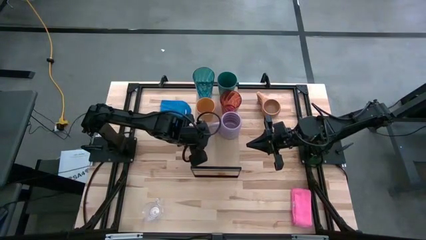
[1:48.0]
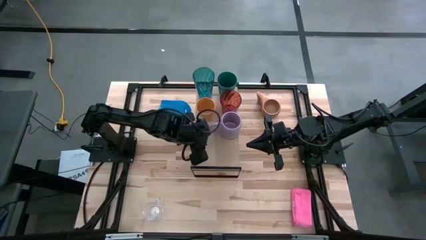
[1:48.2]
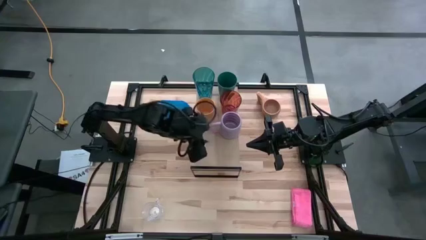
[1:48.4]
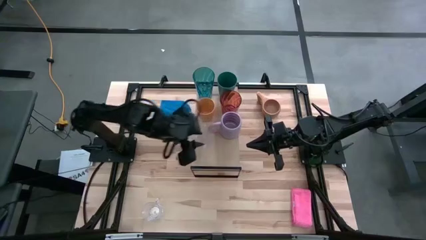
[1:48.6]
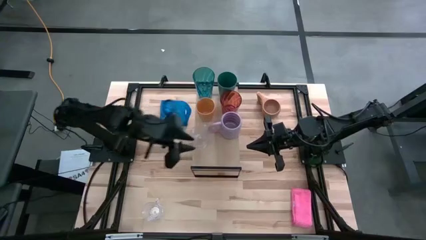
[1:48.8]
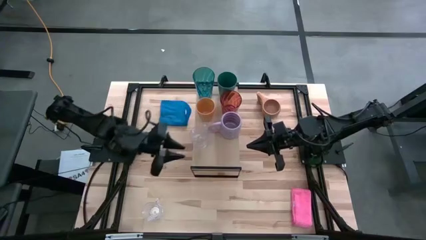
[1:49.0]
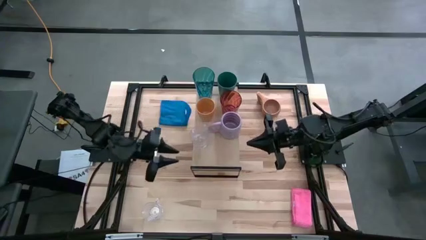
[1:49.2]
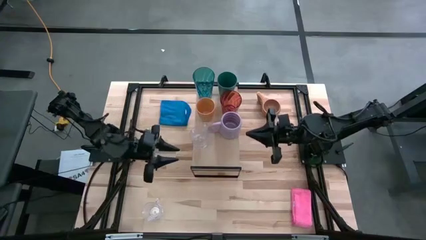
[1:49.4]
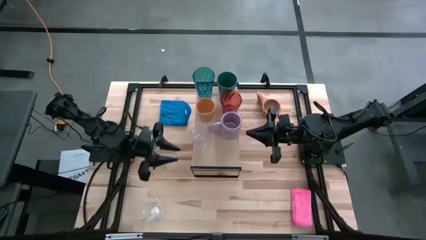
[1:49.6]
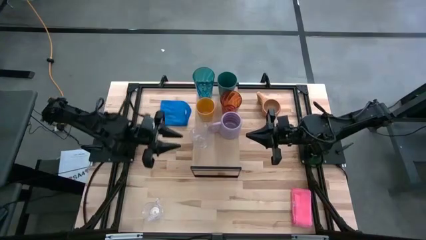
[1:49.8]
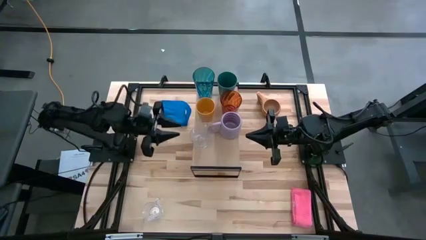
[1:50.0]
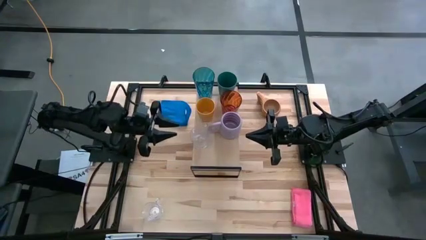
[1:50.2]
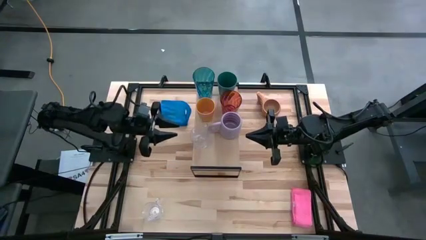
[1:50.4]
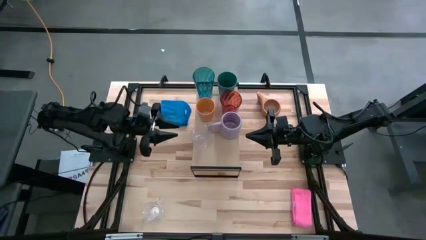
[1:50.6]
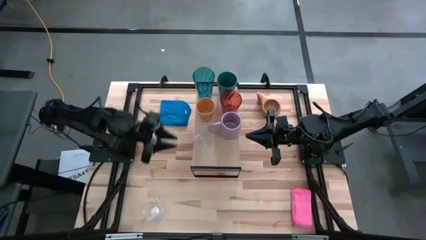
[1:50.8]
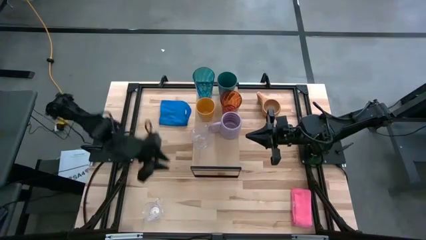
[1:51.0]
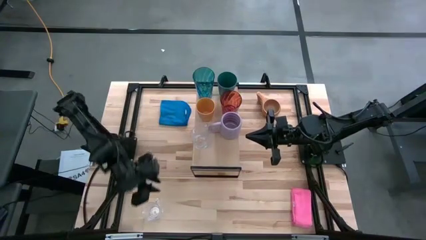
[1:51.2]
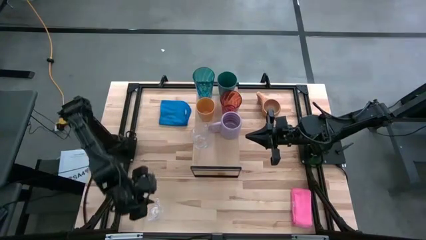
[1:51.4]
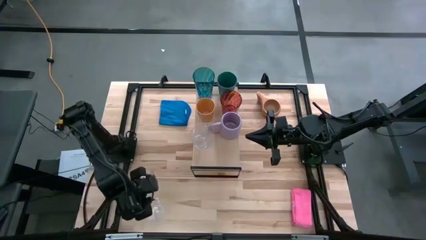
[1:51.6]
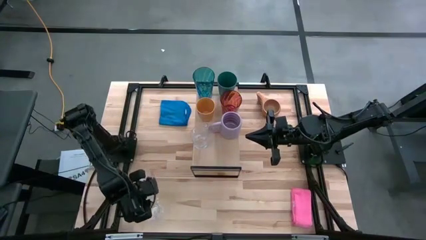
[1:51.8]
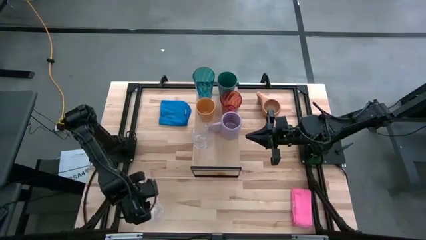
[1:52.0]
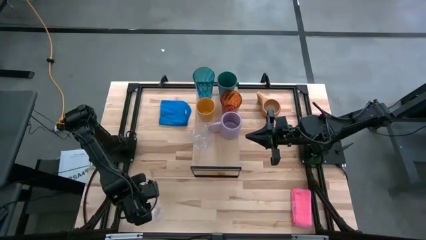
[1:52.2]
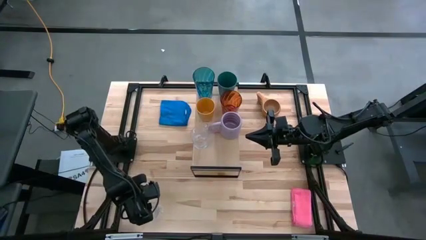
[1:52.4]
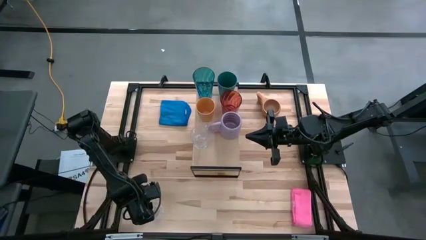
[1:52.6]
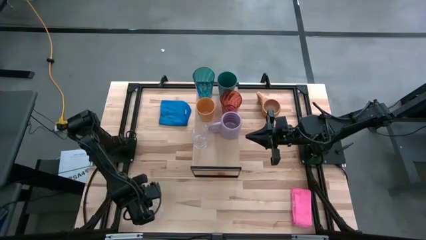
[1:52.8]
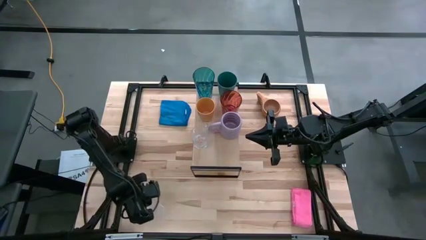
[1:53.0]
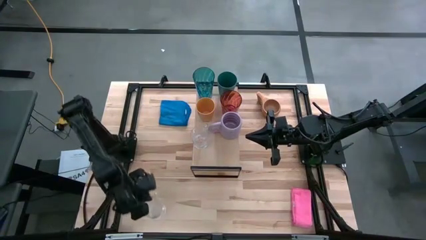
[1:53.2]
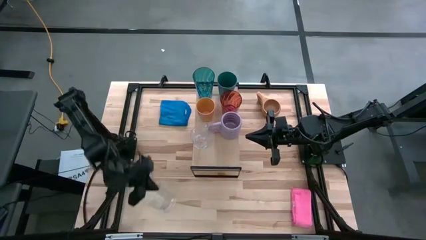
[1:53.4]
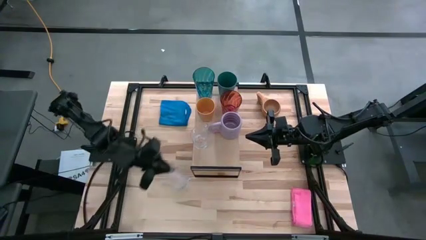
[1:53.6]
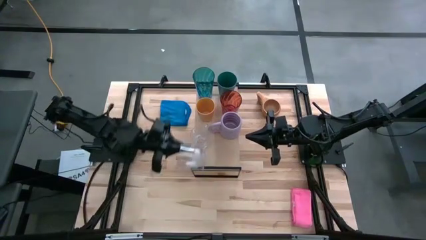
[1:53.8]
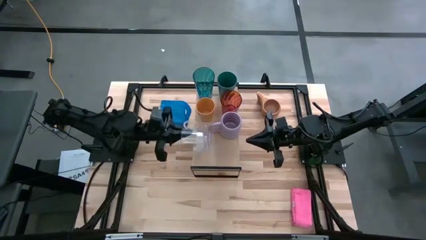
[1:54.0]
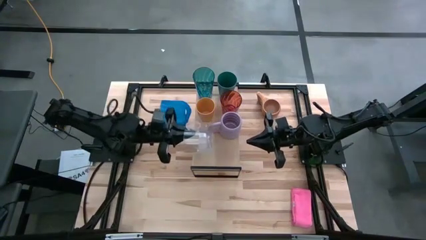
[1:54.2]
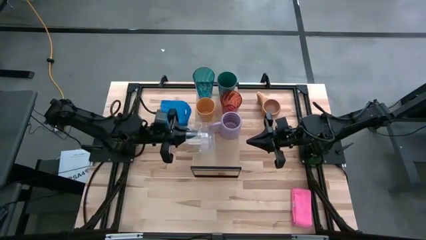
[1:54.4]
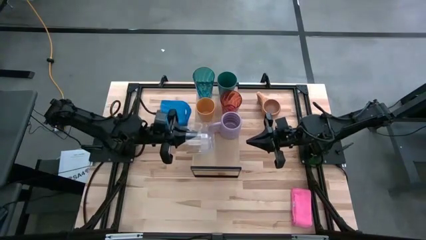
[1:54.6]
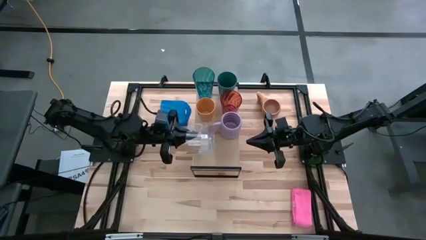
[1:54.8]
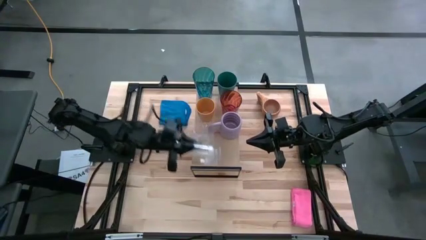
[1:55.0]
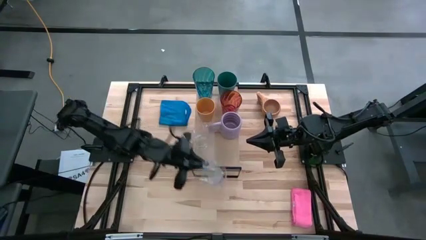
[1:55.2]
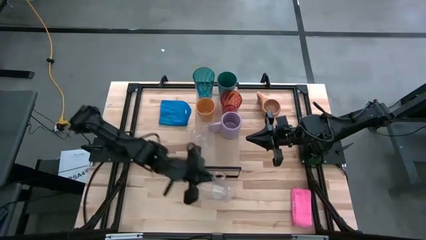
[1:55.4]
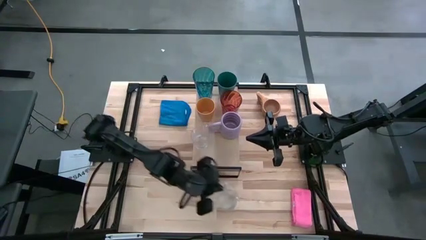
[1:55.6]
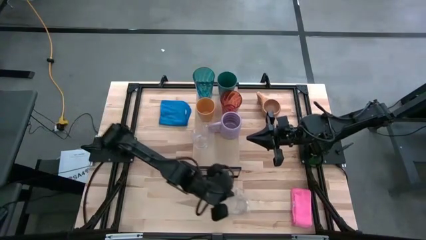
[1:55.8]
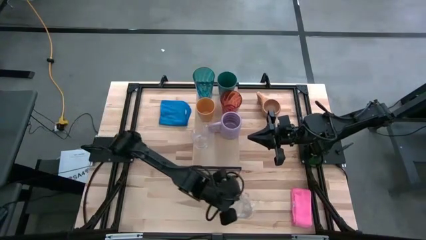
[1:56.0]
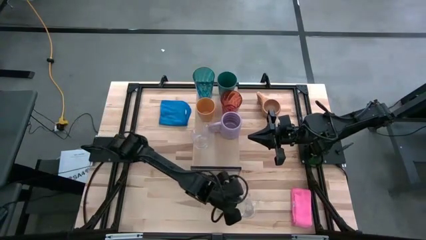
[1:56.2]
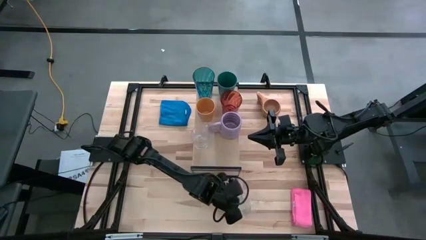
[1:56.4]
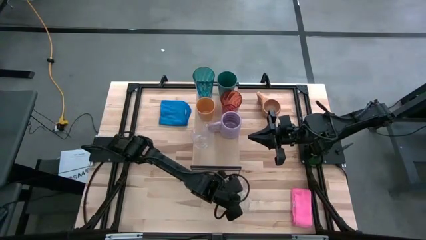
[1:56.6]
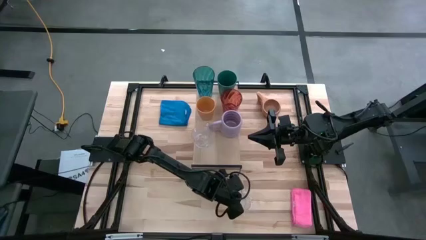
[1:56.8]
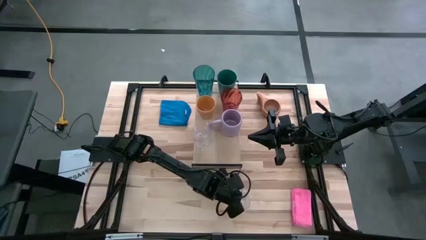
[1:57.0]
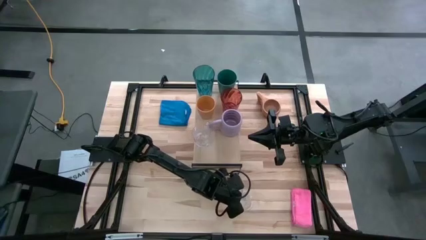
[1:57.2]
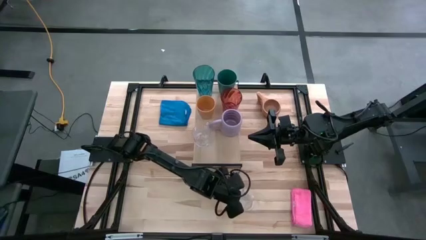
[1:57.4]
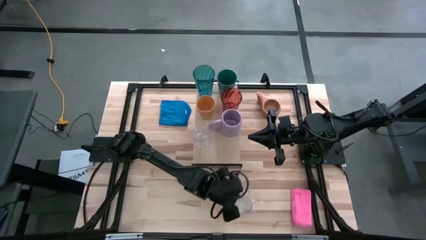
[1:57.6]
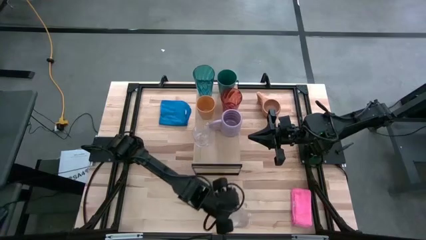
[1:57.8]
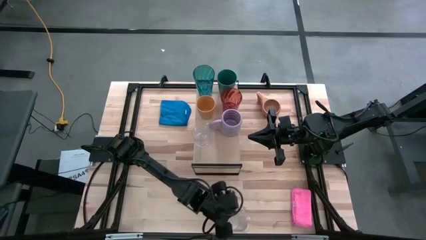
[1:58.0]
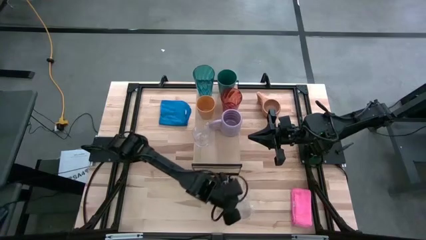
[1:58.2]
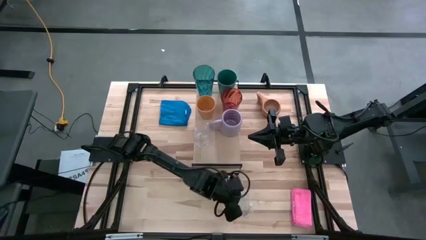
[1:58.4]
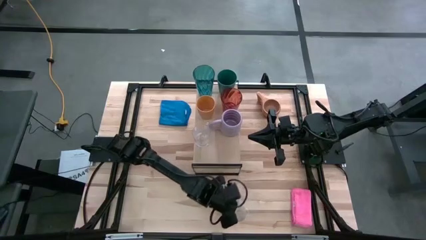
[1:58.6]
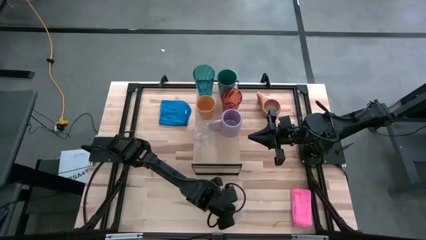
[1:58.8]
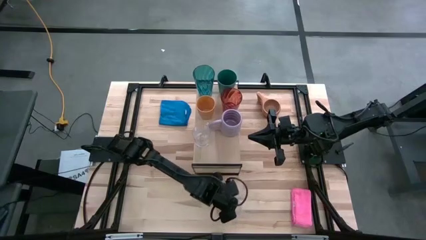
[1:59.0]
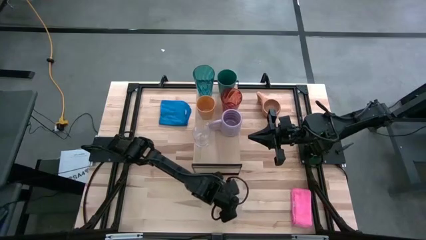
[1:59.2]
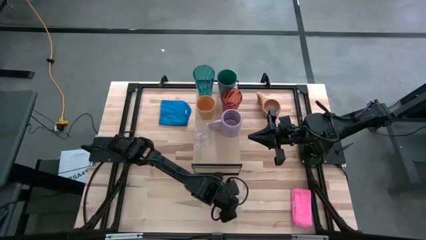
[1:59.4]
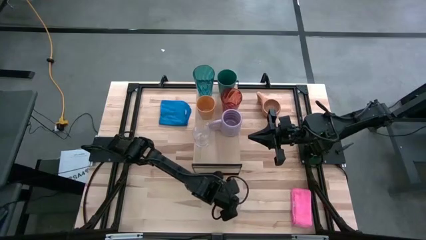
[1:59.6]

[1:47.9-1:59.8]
Task: Stack small to large cups/mugs on shelf
Put the transparent mug on the shelf

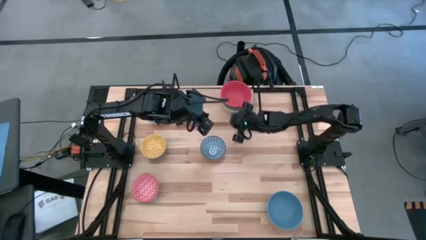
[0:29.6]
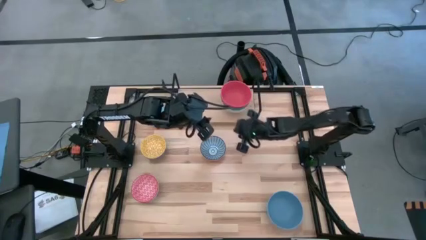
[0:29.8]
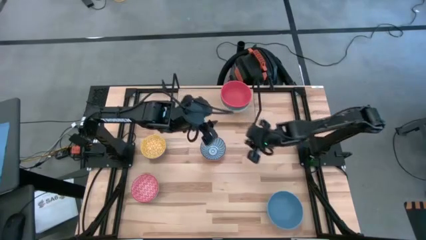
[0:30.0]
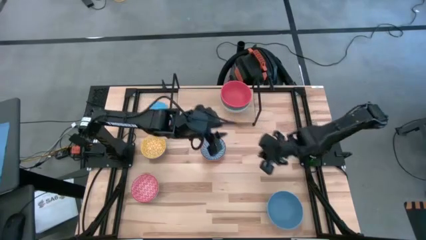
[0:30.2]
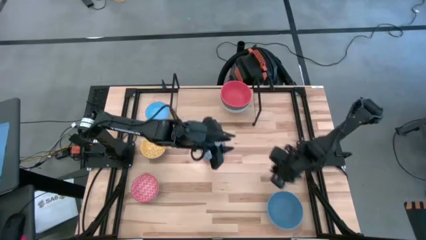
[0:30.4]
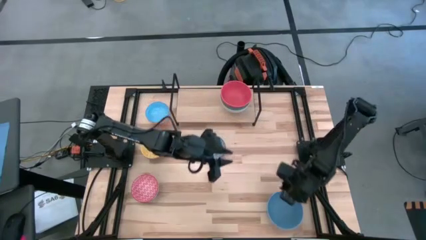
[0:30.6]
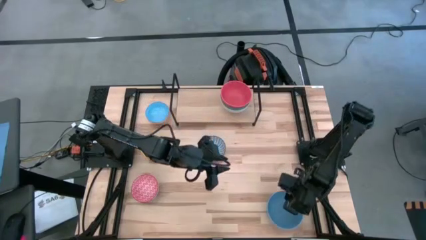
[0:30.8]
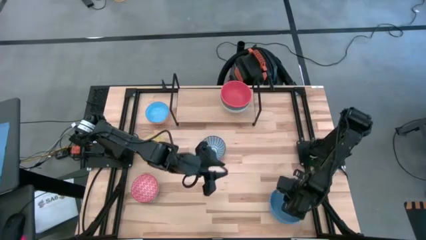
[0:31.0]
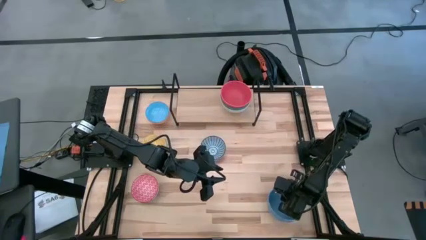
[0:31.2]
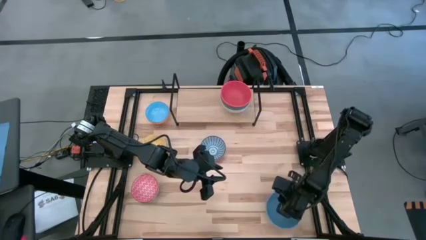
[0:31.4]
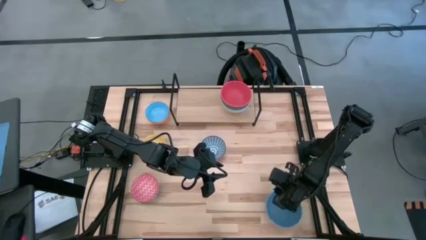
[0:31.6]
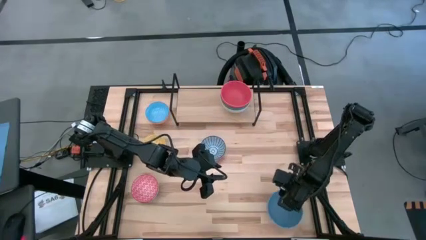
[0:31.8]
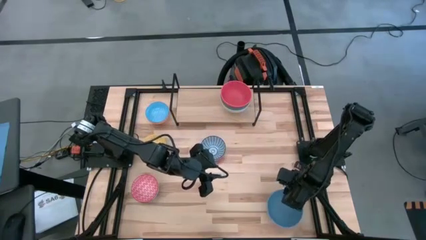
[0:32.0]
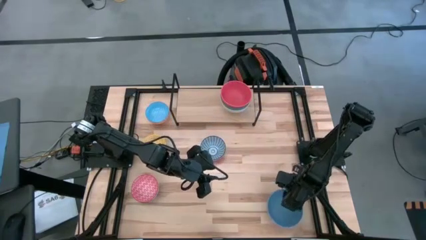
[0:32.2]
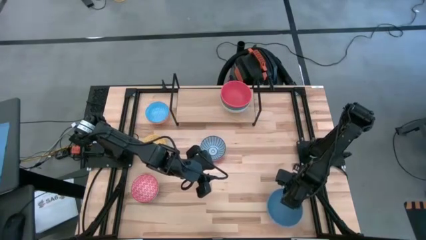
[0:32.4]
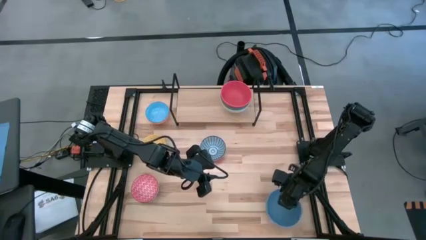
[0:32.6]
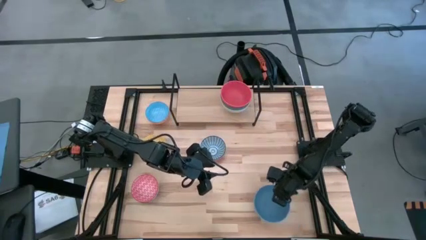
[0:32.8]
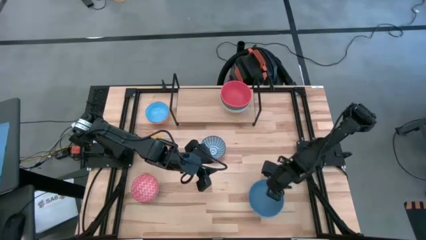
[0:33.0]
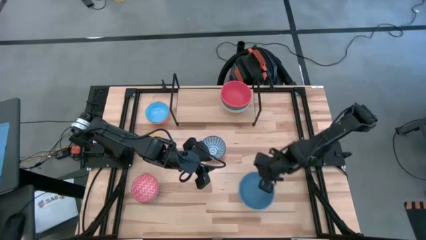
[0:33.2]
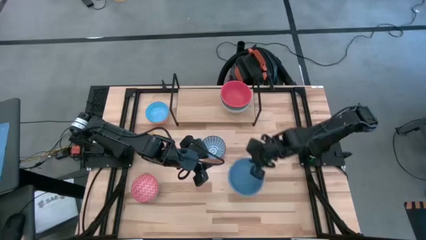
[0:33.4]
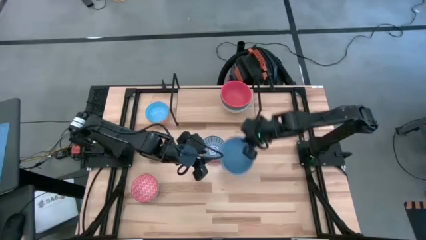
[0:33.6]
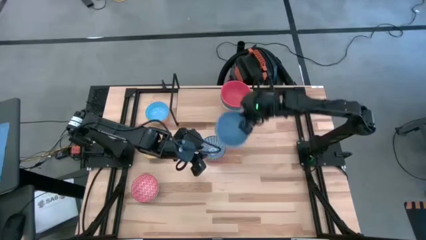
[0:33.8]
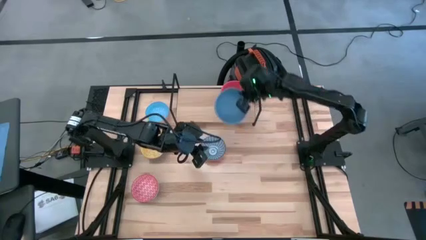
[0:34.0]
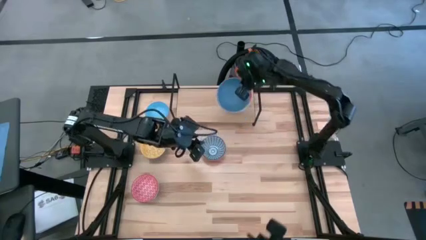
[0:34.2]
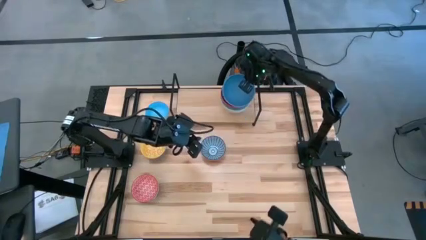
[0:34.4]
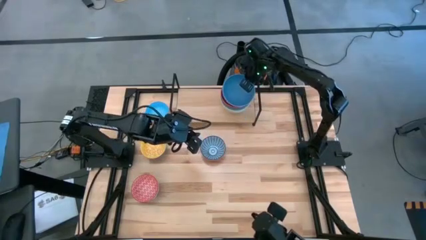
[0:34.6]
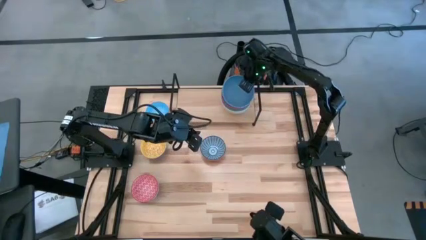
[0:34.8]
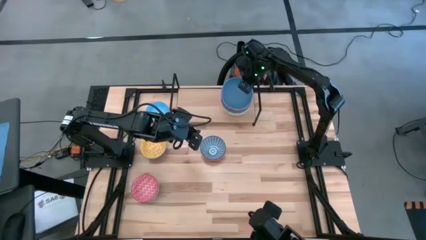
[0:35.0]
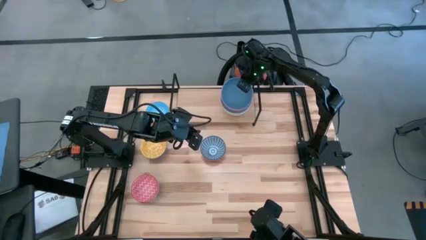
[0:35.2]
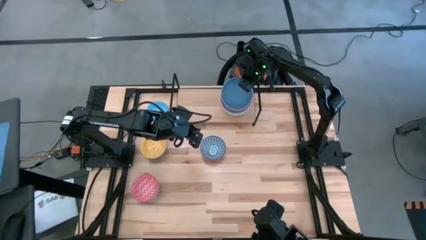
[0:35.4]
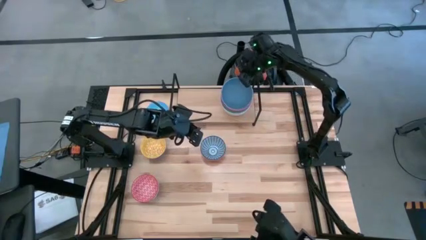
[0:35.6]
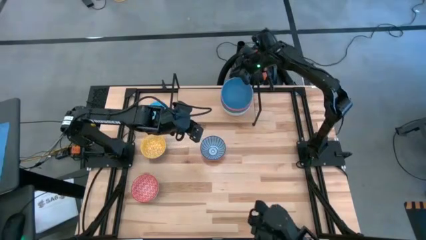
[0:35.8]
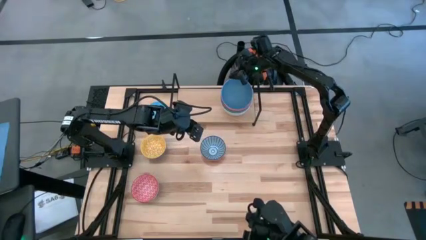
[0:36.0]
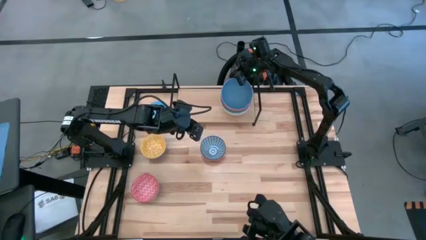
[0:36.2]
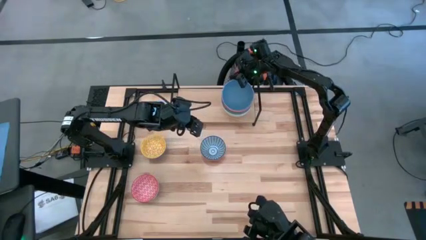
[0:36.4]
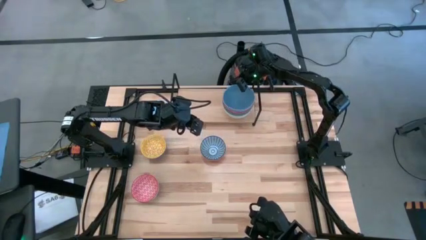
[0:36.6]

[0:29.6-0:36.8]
Task: Place and stack bowls onto a shelf
Stack the big blue bowl on the big red bowl on the shelf
